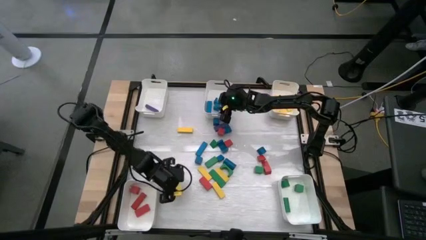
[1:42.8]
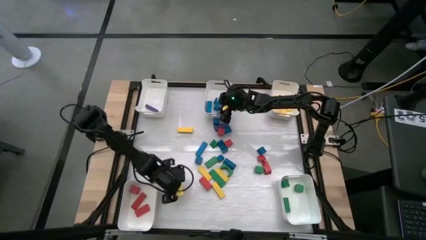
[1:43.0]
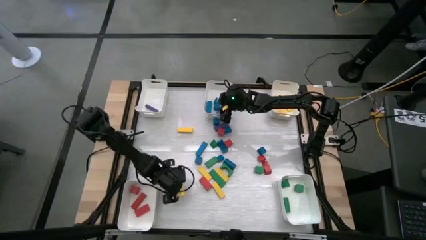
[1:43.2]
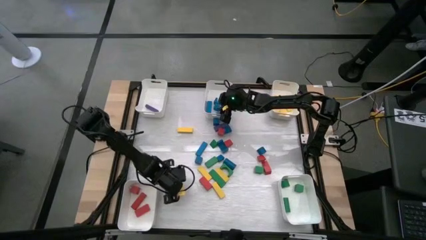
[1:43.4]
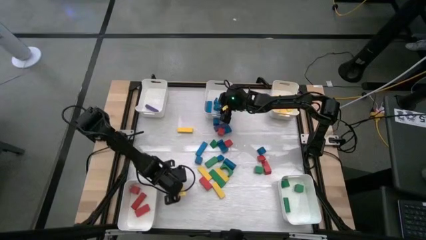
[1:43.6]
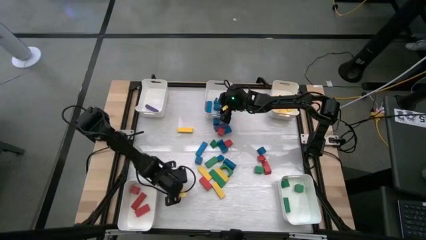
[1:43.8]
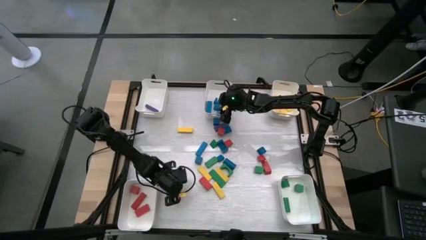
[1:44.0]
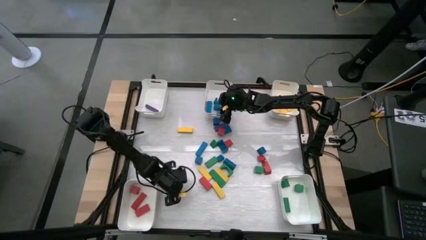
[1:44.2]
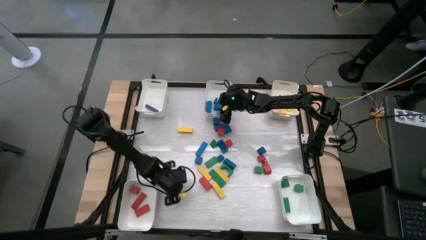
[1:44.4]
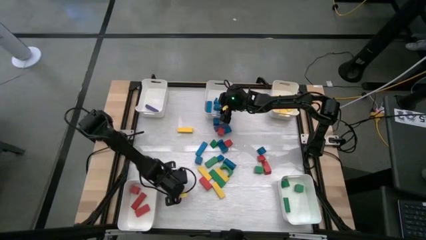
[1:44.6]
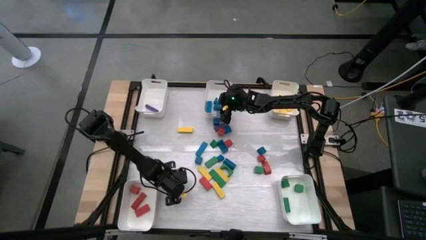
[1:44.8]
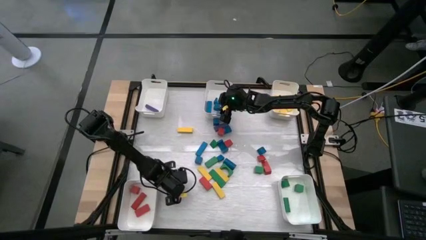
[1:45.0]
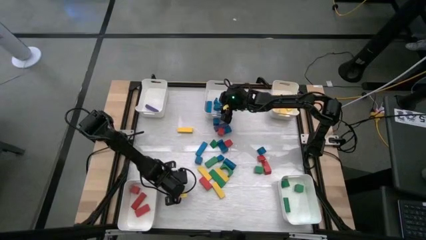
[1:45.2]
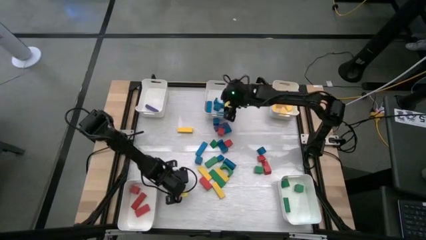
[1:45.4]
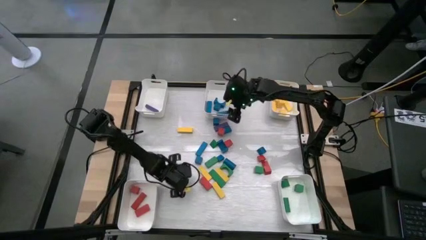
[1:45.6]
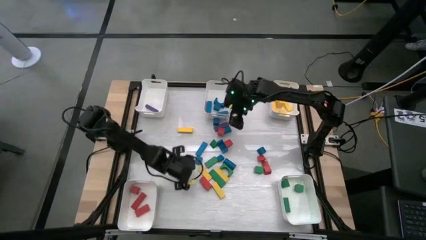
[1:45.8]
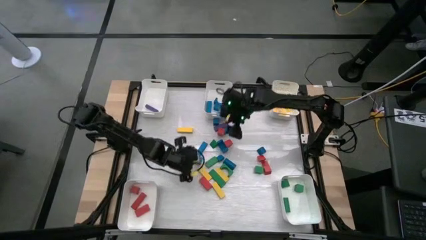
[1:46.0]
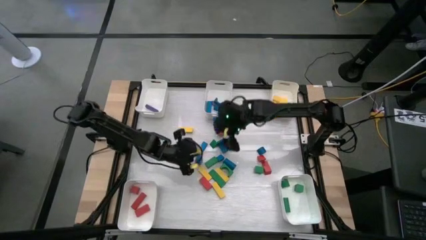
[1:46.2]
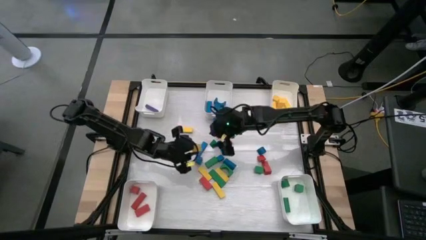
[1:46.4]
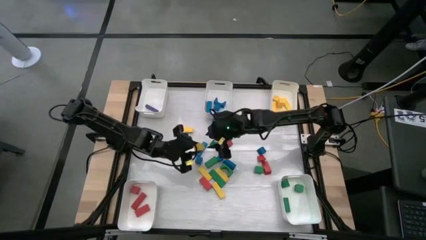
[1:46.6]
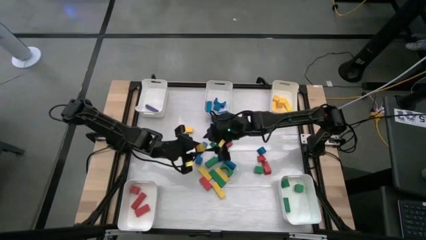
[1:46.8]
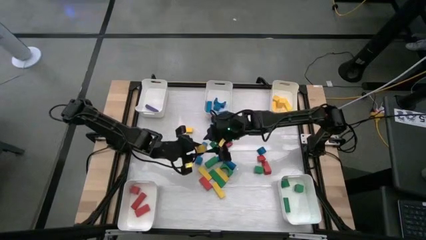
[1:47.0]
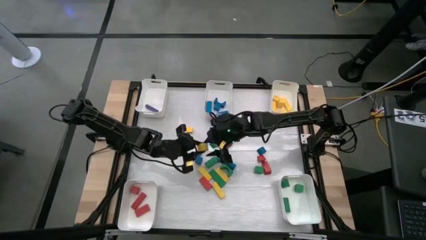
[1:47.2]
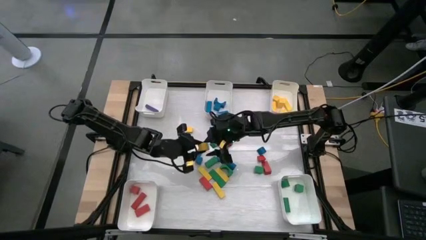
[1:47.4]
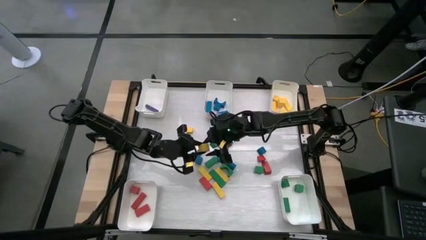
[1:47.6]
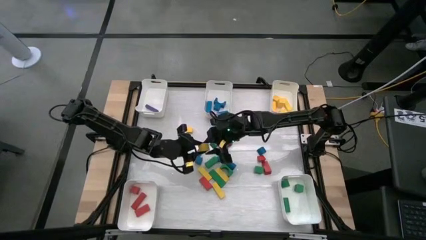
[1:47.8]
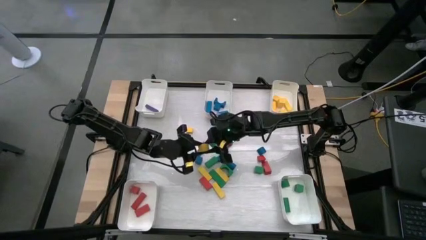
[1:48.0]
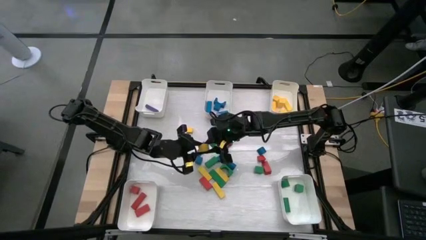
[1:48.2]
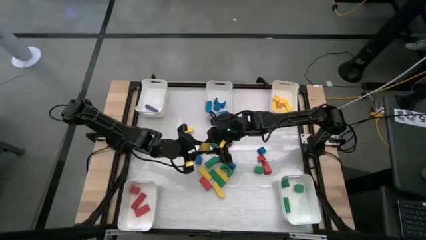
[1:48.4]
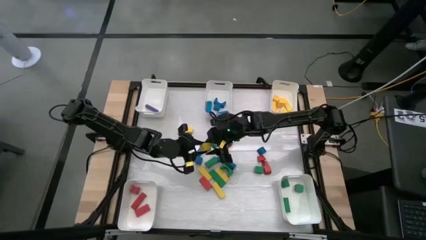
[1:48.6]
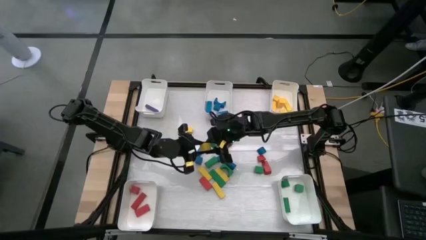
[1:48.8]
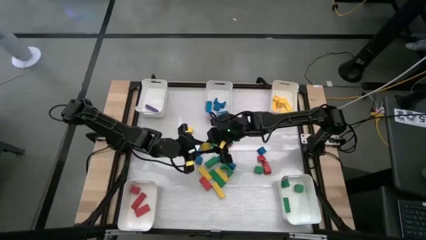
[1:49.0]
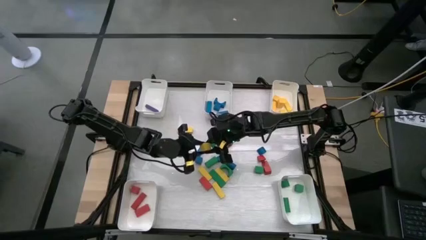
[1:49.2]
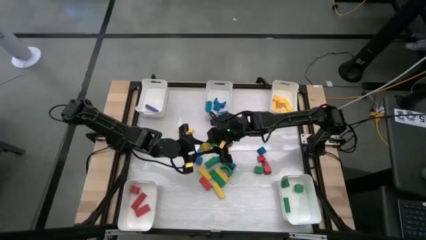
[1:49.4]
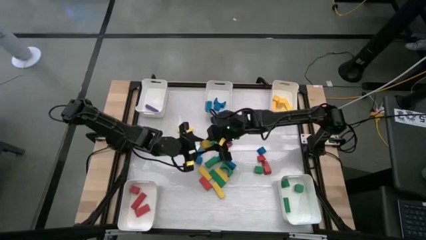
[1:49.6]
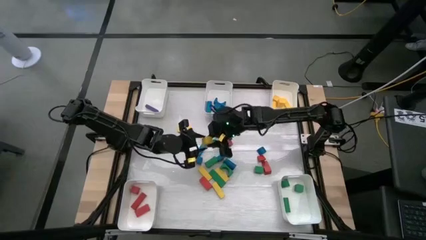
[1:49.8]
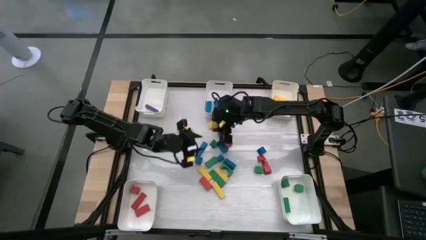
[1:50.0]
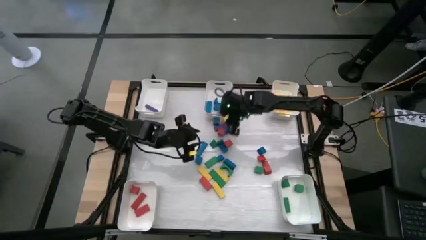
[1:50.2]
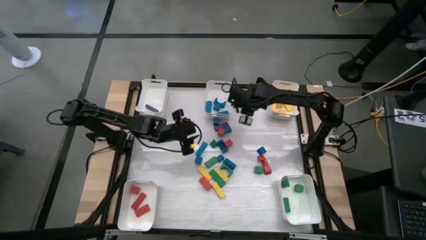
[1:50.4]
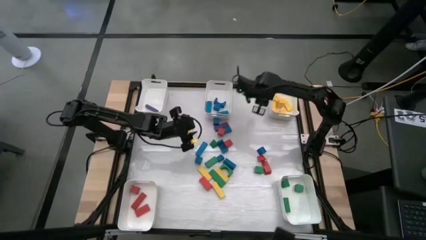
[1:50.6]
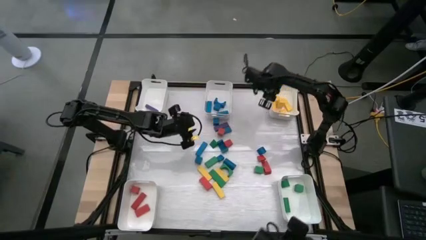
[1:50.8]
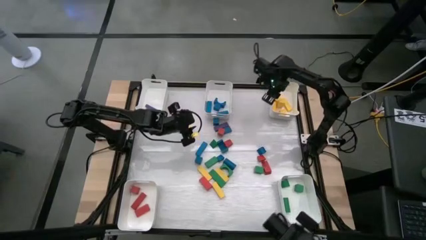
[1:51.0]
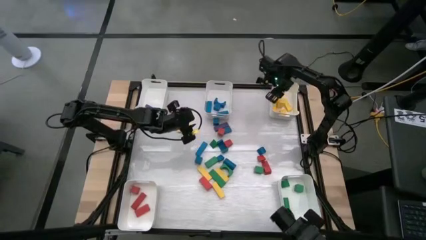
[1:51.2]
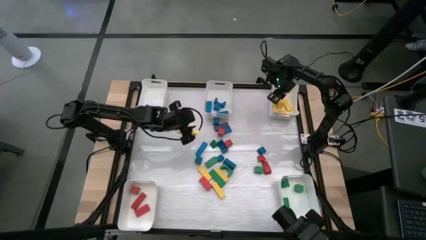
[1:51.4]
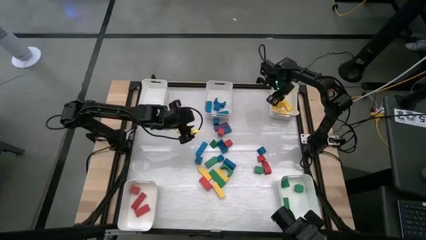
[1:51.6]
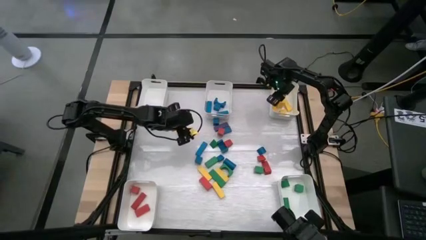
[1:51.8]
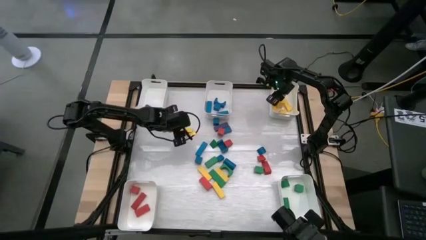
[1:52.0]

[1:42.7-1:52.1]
Task: Sort blocks
Put the yellow block into the top right white bin

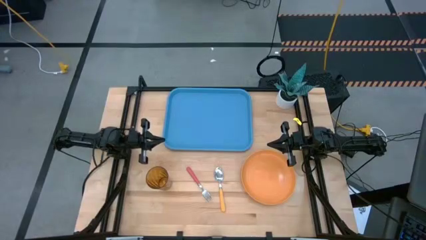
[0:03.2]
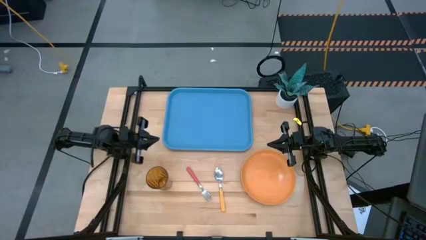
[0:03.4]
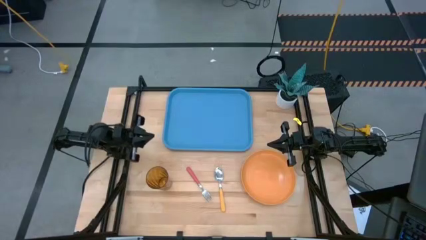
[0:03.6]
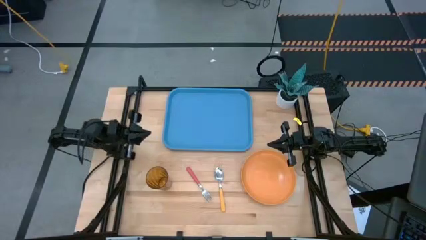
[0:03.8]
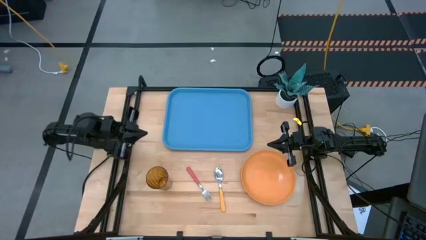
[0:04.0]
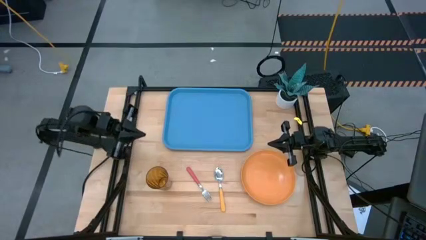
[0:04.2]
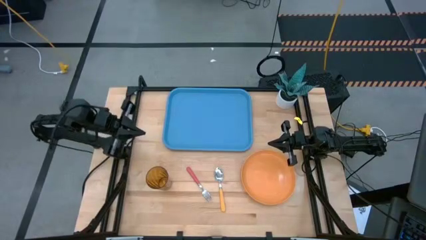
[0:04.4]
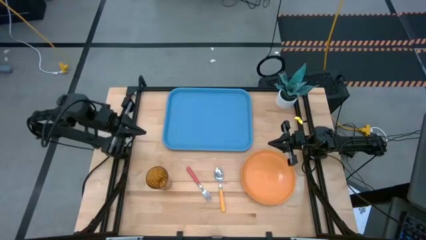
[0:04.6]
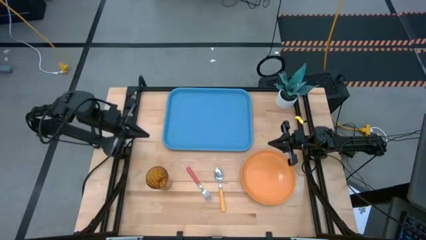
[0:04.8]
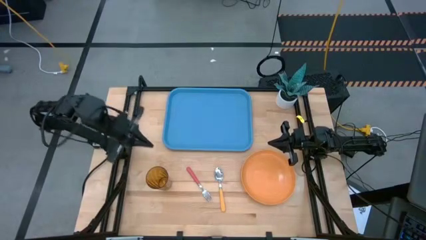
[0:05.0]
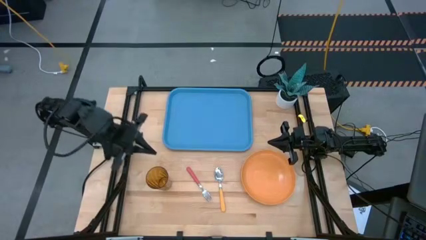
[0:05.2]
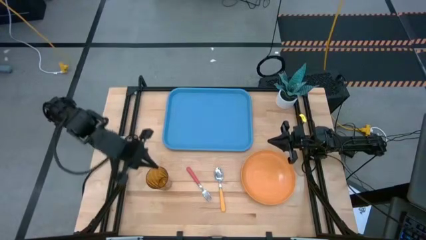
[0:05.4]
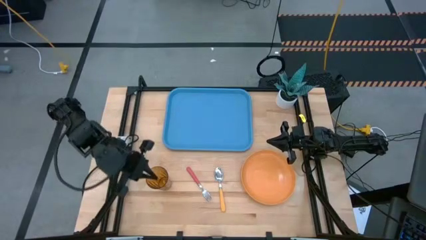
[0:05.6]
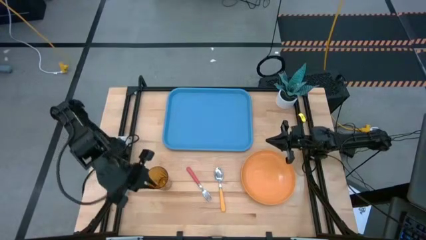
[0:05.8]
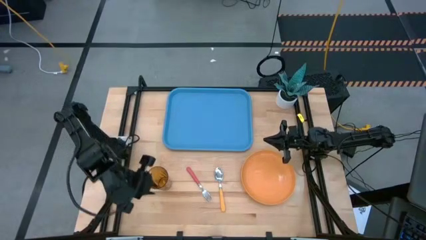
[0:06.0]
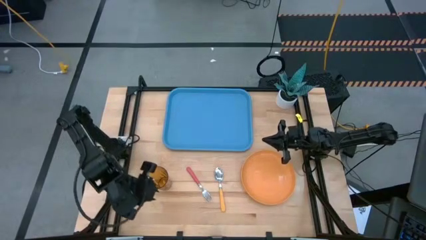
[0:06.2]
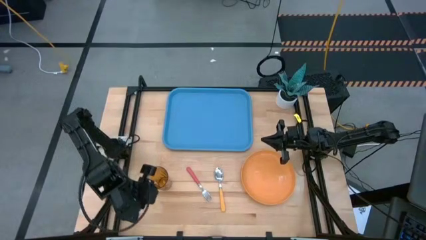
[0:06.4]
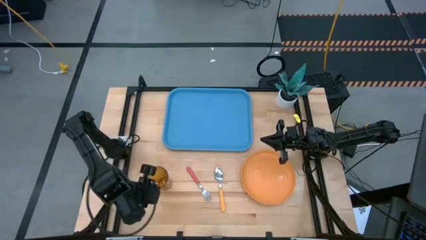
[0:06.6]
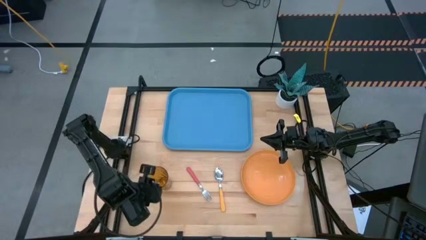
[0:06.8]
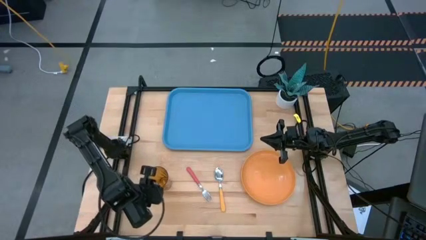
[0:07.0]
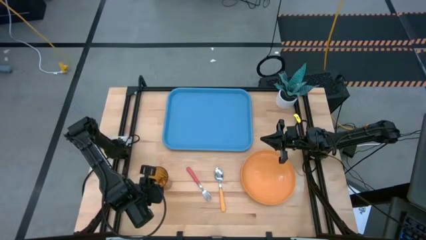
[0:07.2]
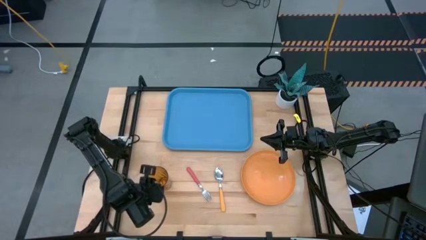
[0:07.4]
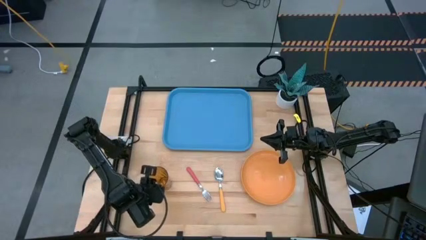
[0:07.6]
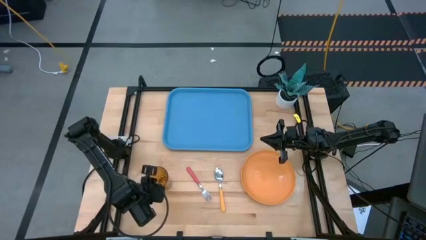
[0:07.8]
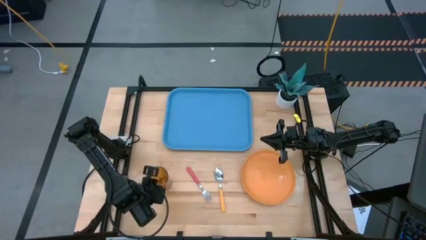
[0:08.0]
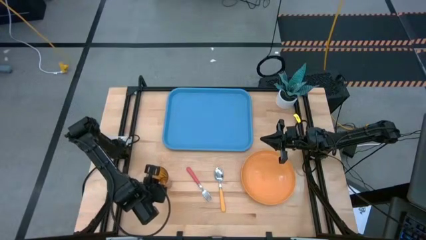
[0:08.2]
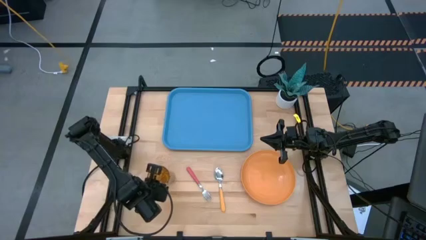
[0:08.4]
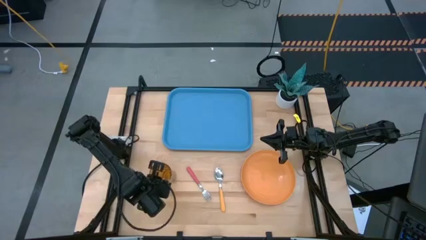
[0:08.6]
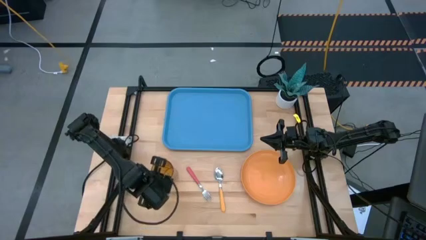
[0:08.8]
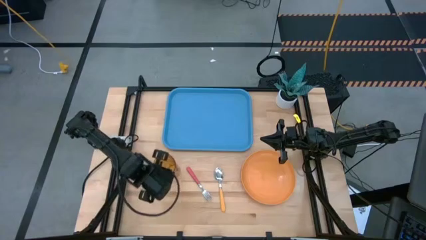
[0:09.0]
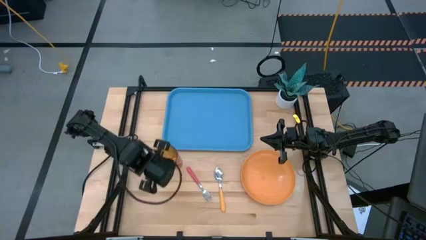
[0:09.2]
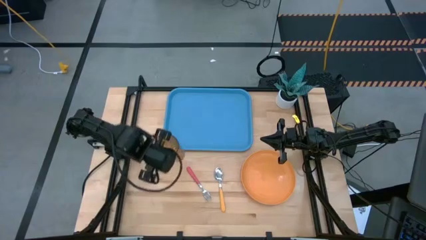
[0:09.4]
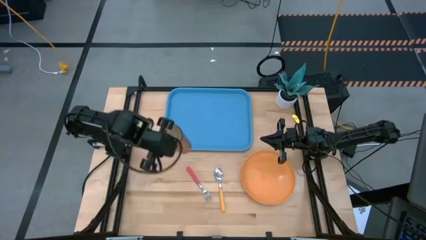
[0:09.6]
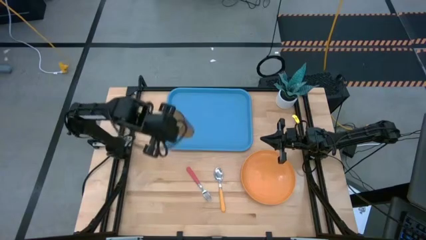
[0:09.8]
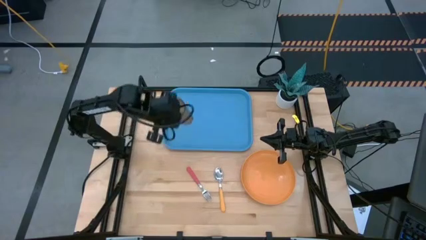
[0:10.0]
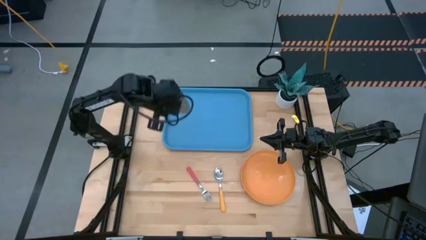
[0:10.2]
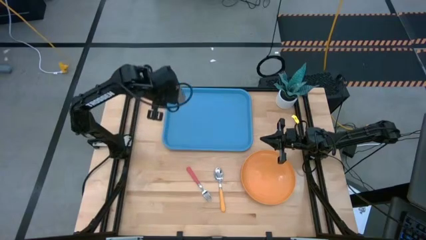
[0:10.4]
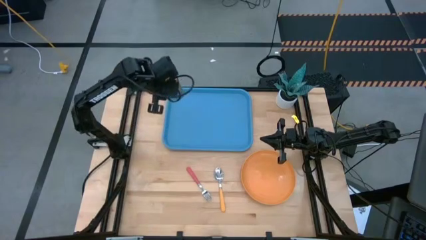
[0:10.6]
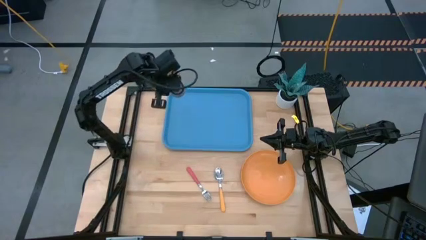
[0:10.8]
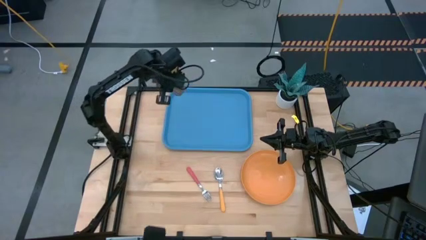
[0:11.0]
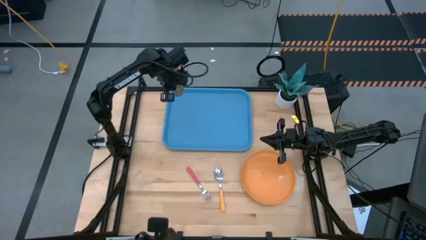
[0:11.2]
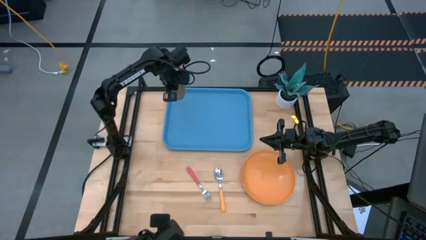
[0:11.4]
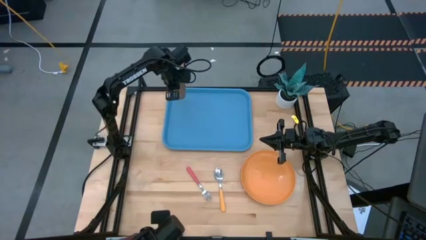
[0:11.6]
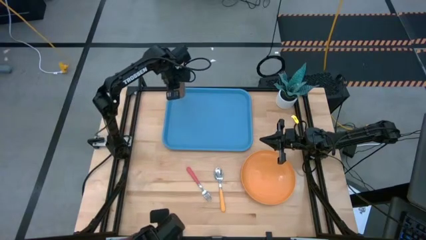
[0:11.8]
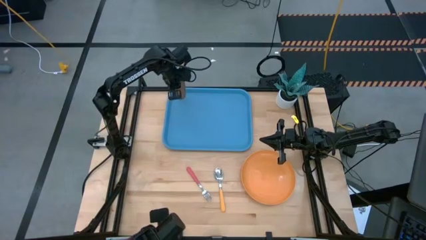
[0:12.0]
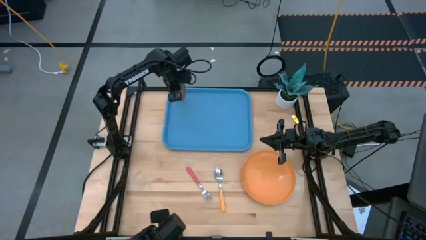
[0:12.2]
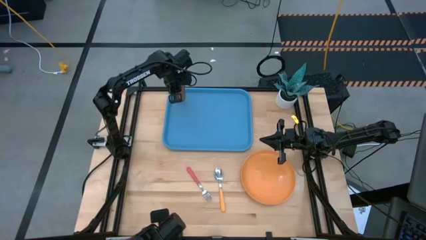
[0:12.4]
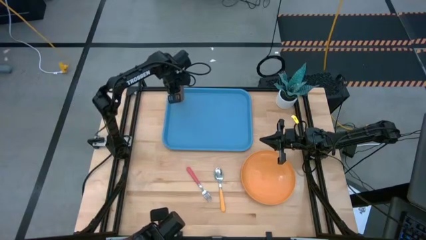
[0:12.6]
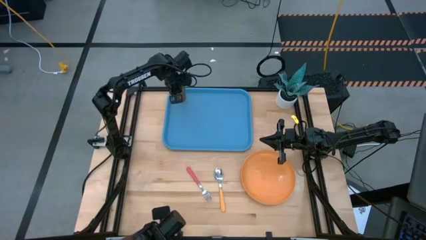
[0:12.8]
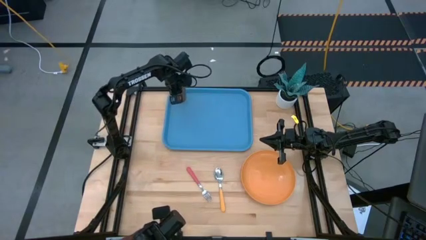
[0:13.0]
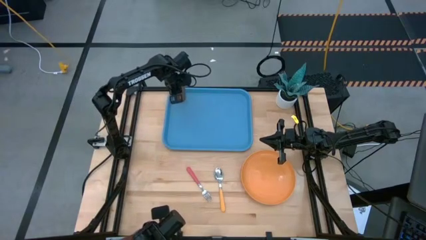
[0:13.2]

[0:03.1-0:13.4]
Task: Pick and place plate/cup/fork/spoon on tray
Put the yellow cup on the top left of the blue tray
